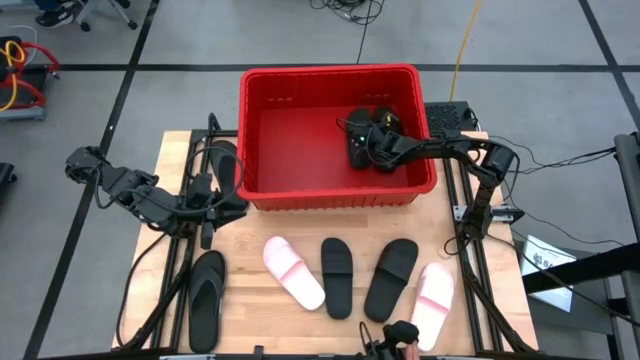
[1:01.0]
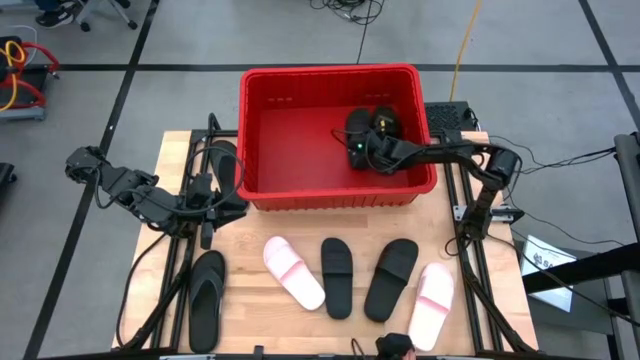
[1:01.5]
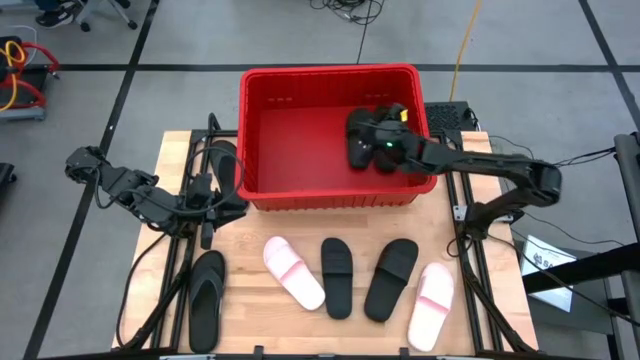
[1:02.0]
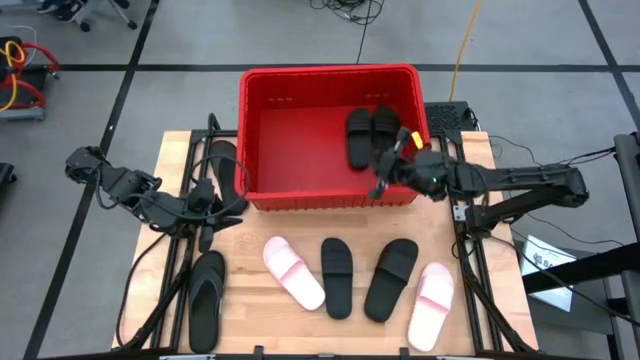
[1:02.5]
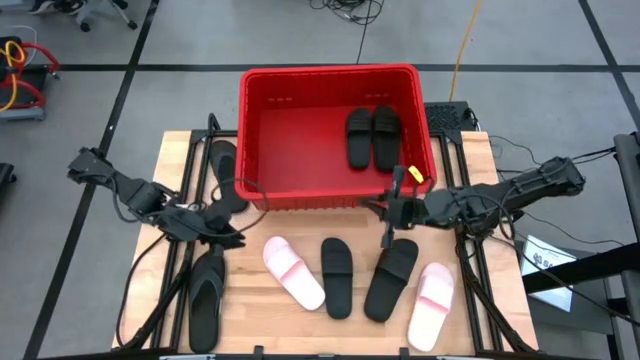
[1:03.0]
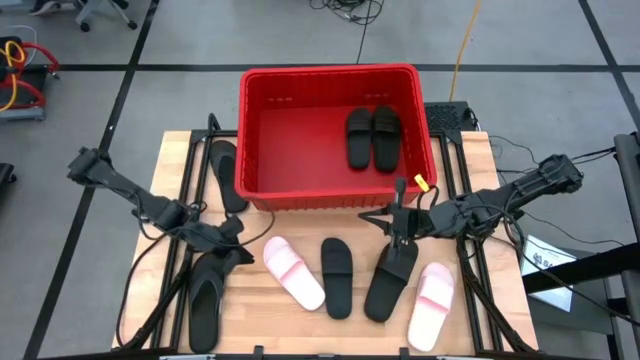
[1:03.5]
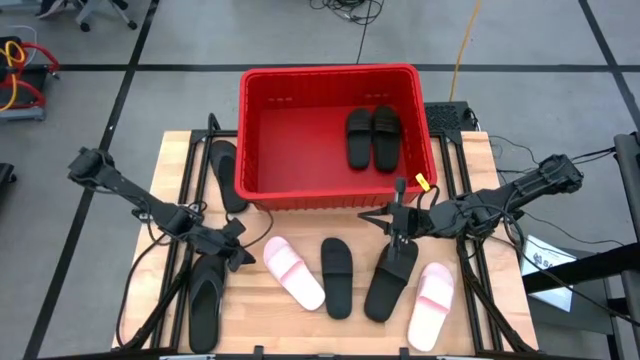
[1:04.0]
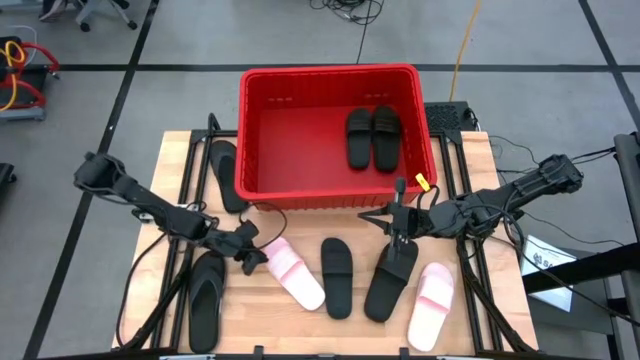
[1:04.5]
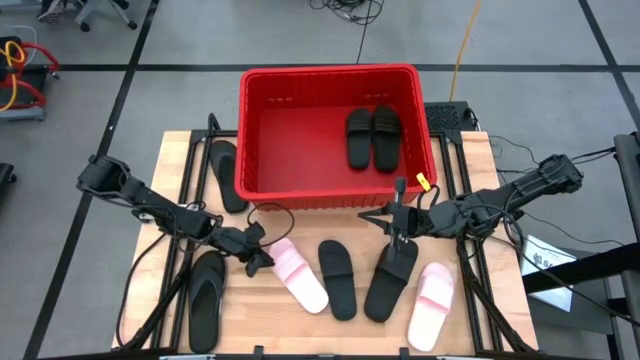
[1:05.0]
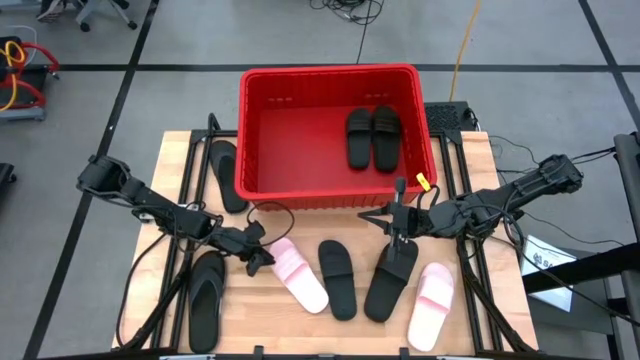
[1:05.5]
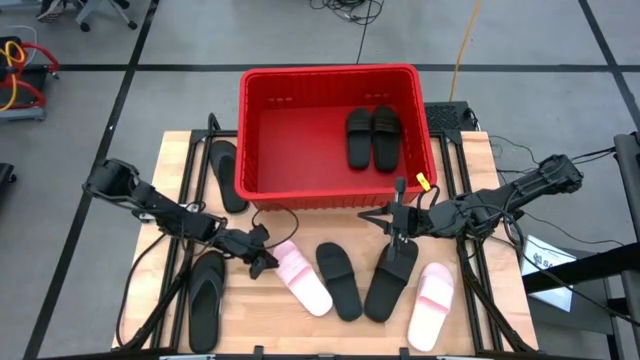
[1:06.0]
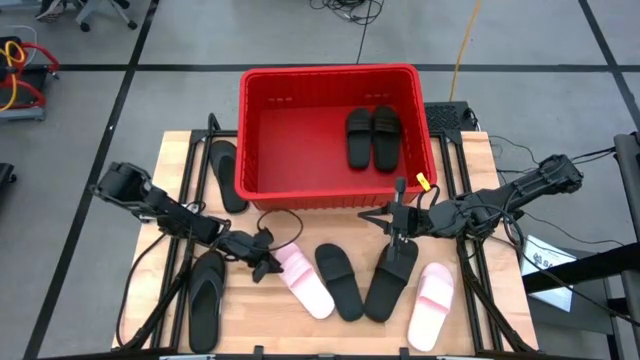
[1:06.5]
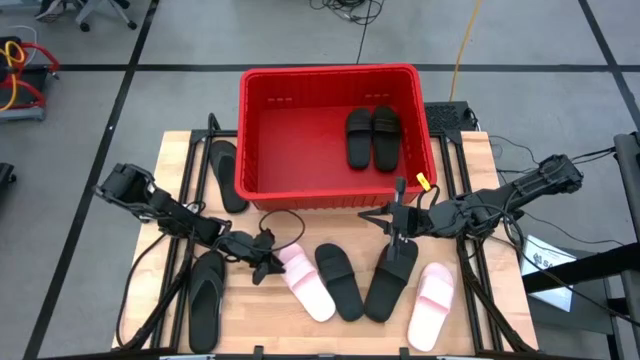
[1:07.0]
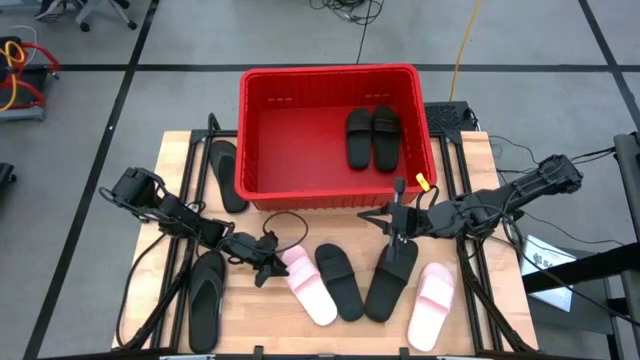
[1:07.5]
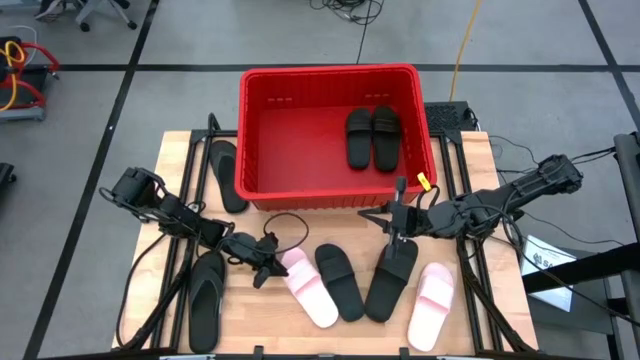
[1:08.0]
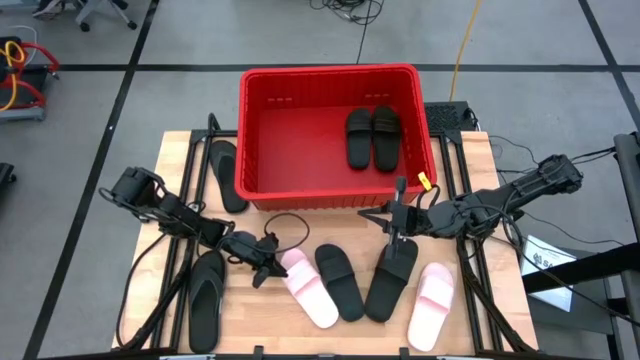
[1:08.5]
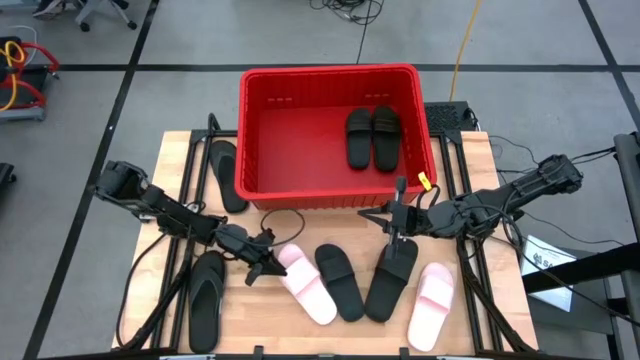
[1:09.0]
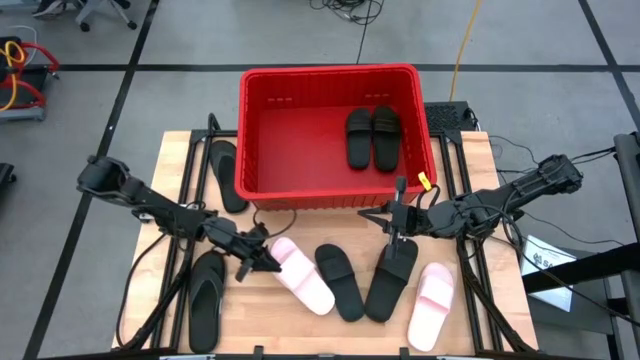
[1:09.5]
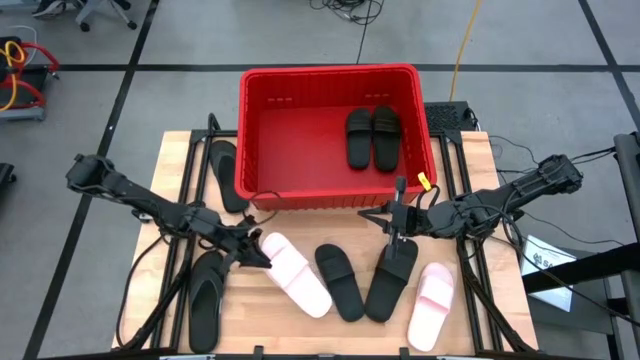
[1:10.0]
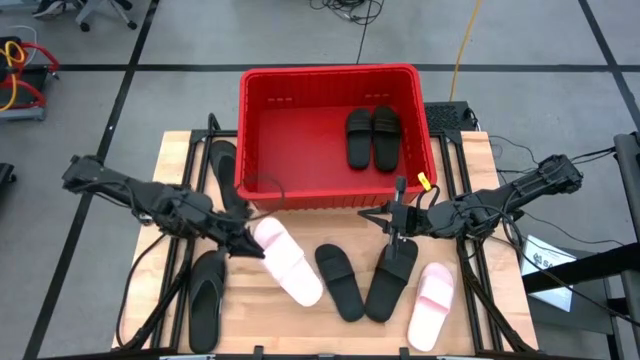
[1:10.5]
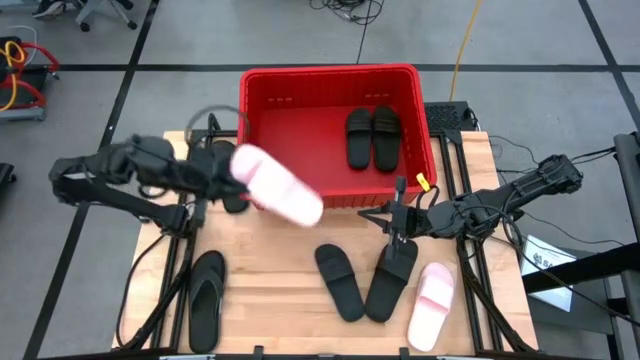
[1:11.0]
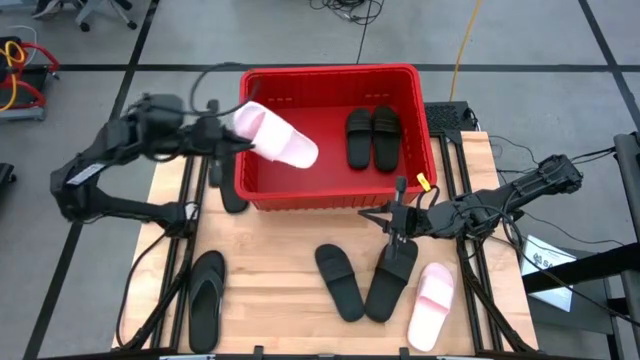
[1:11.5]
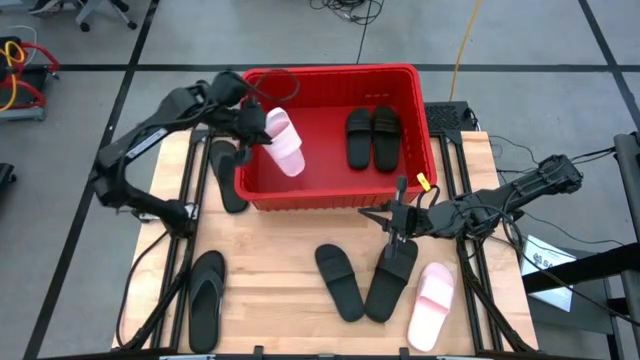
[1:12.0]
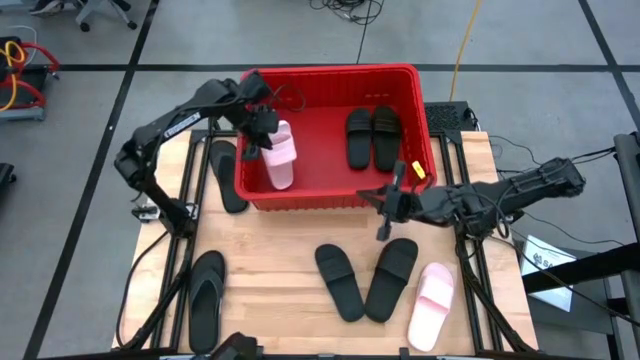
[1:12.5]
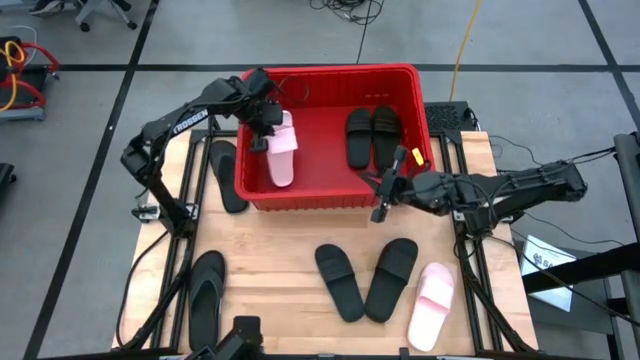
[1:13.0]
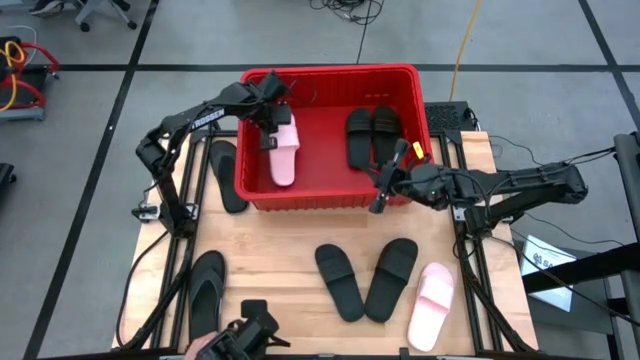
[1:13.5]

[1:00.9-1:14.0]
Task: Pick and place slides into bin
Put the left pink slide into the red bin

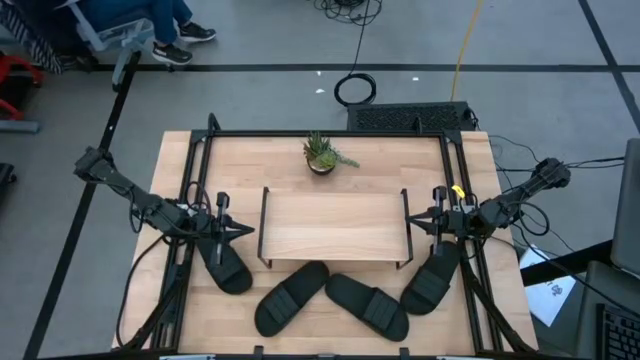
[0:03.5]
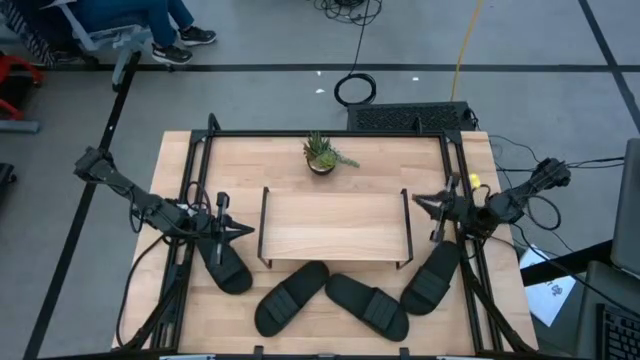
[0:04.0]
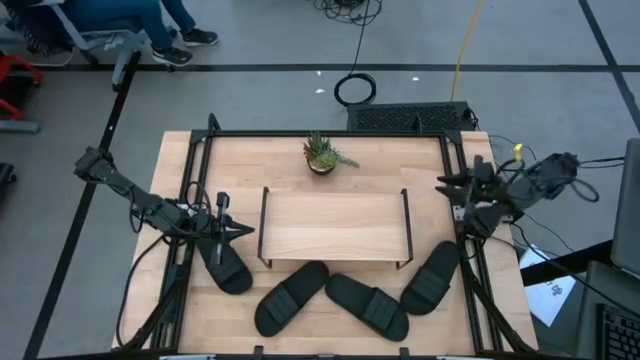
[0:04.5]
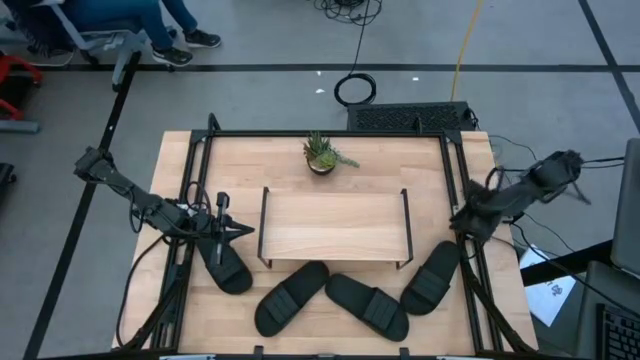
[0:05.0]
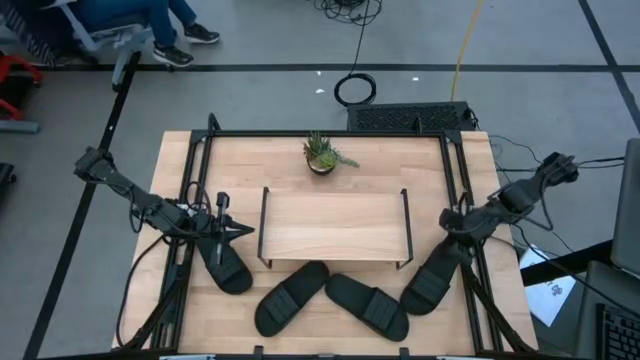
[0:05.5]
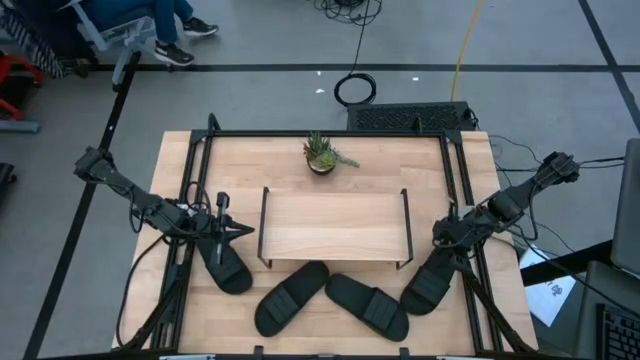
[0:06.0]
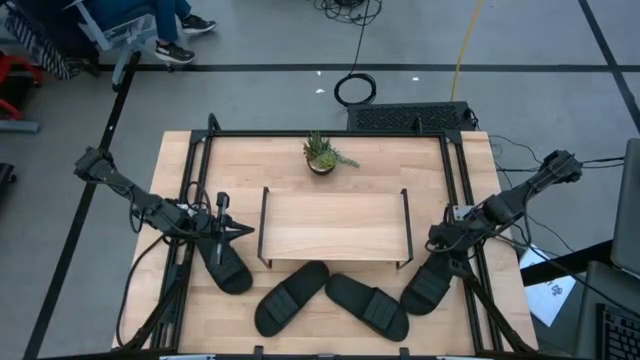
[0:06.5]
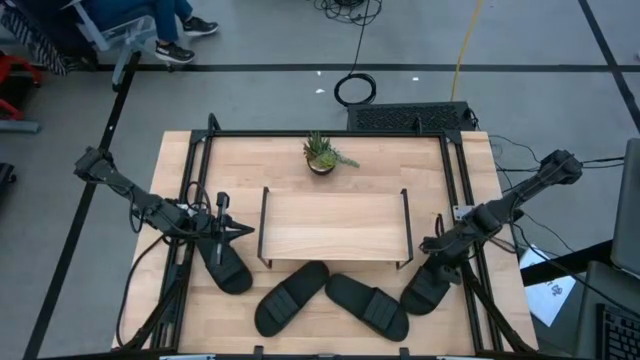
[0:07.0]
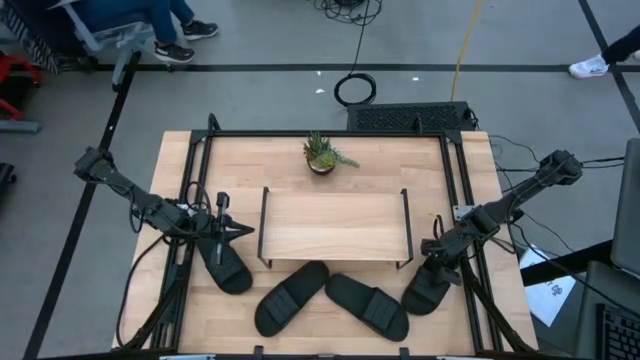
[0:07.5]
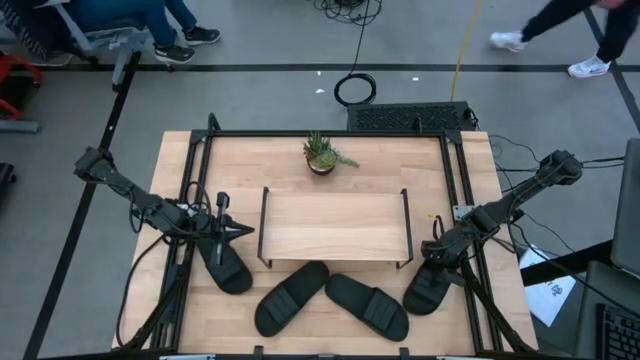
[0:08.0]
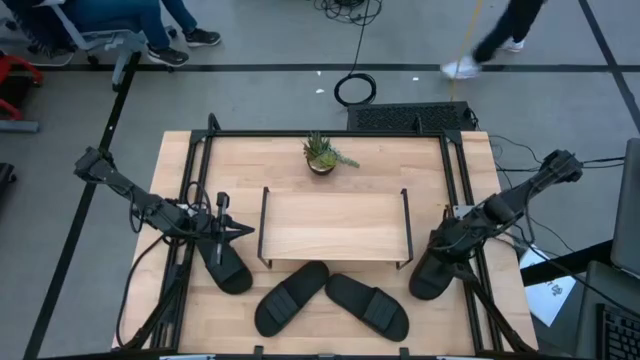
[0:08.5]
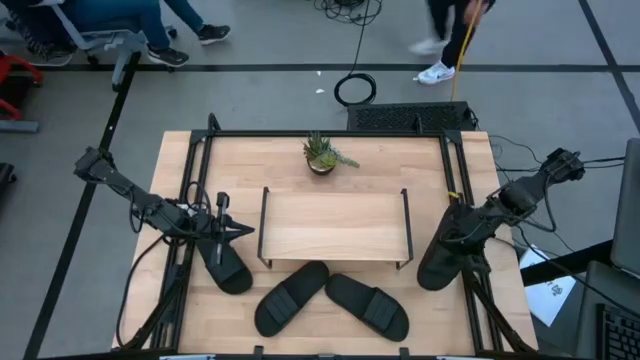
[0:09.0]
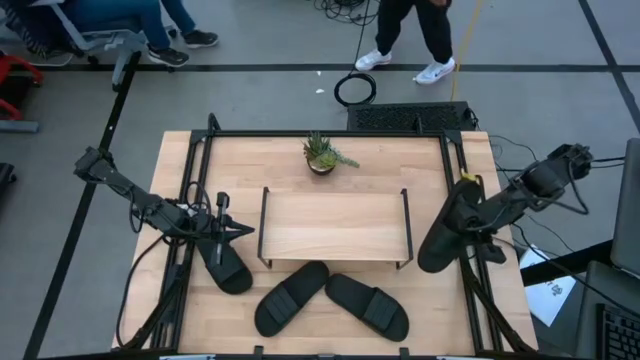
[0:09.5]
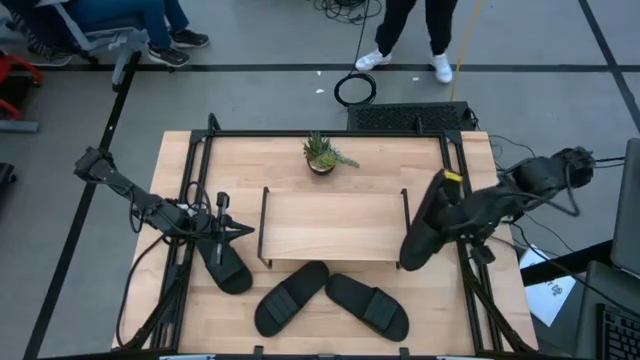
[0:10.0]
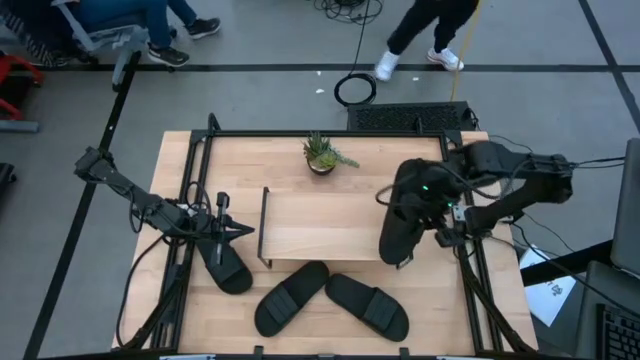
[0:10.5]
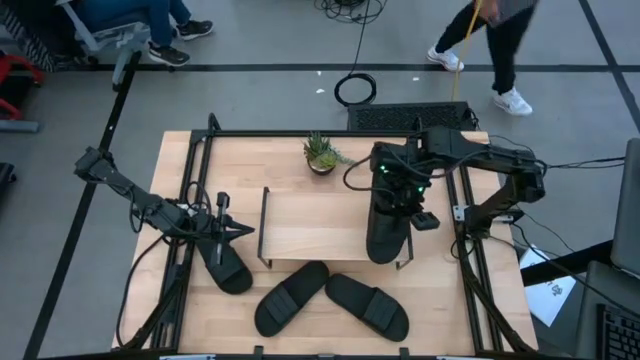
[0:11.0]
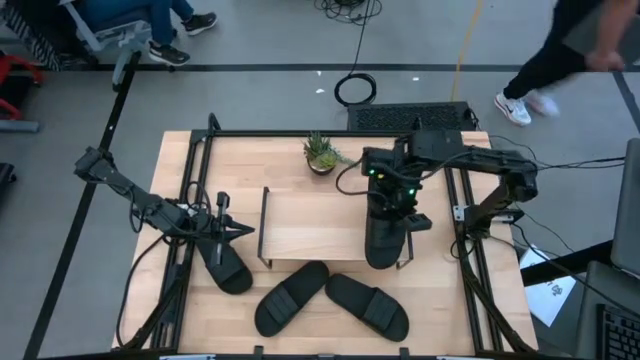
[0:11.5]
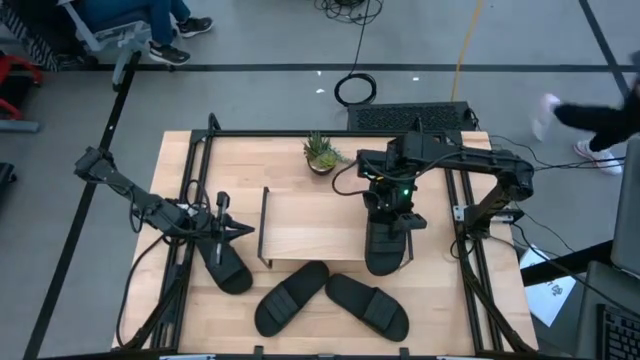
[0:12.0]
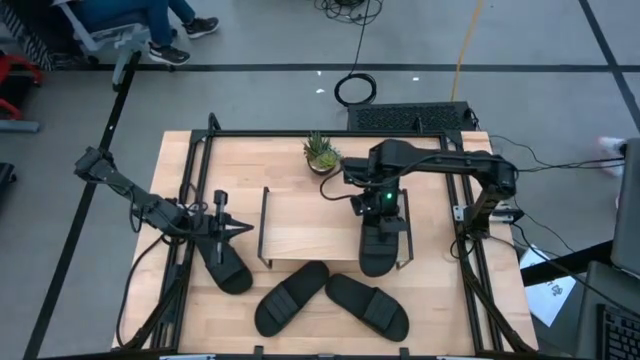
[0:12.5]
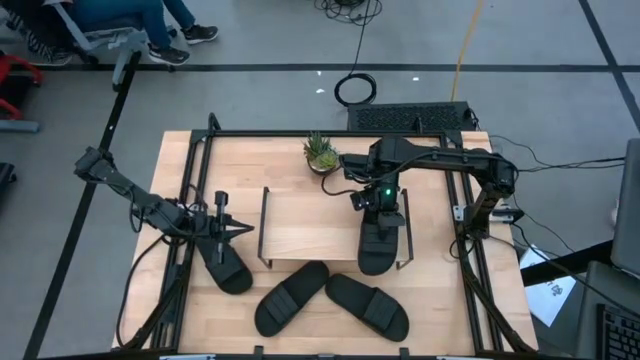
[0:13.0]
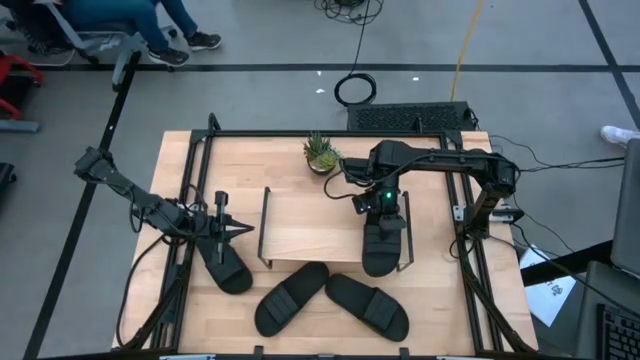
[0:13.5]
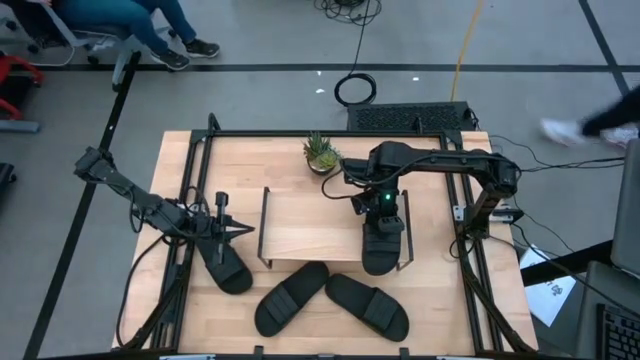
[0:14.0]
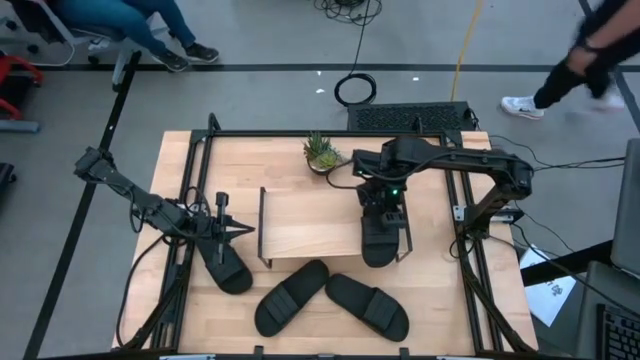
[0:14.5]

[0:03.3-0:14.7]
Task: Pick and place slides into the shelf
Put the black sandal on the shelf
